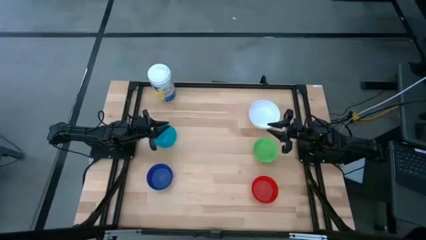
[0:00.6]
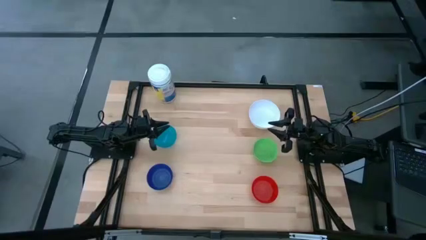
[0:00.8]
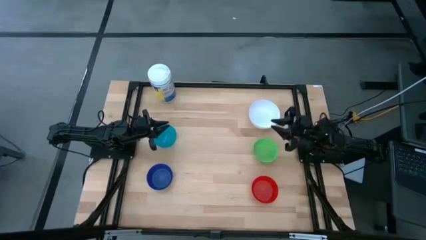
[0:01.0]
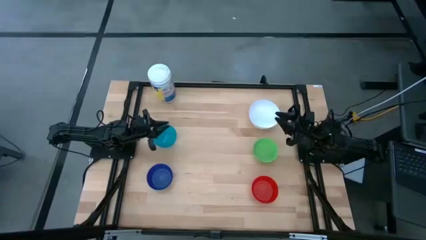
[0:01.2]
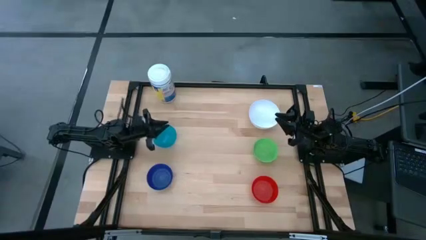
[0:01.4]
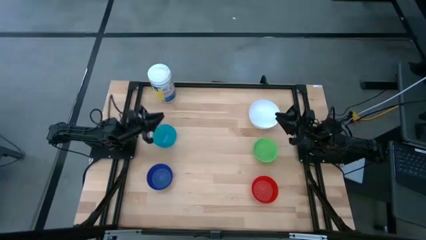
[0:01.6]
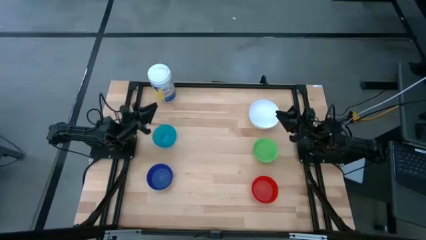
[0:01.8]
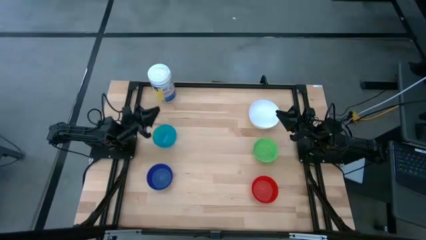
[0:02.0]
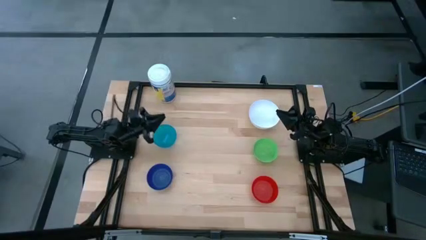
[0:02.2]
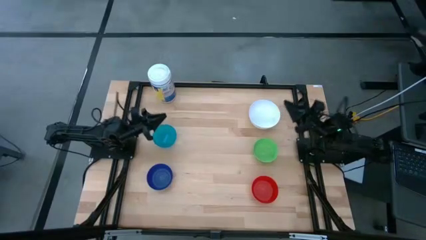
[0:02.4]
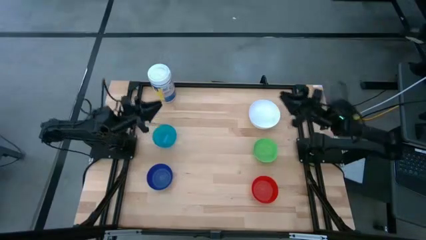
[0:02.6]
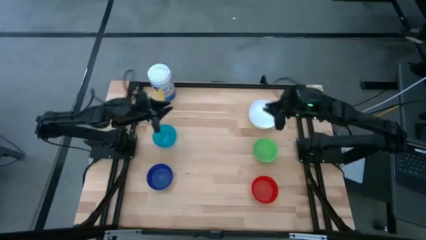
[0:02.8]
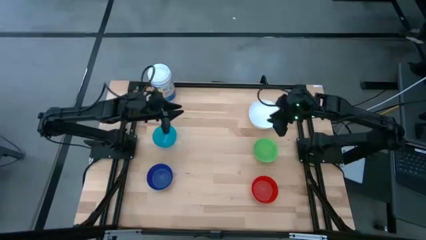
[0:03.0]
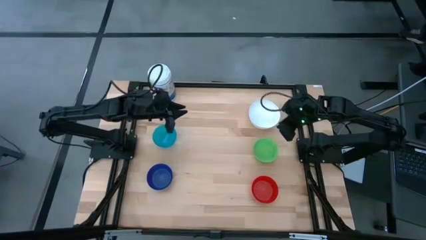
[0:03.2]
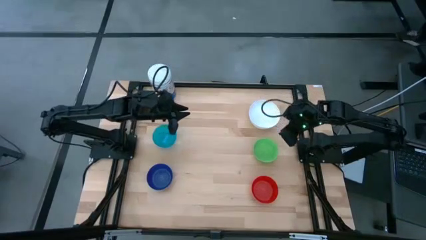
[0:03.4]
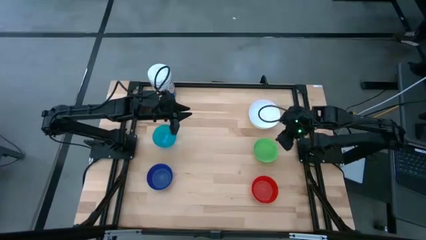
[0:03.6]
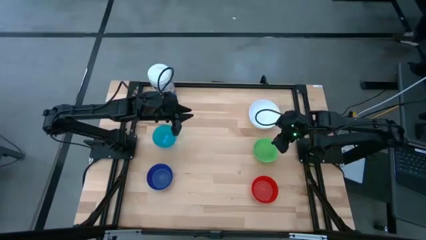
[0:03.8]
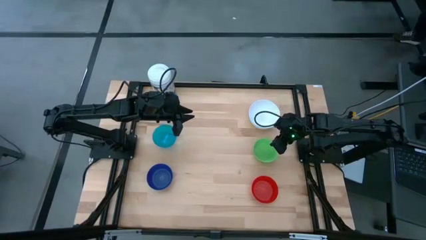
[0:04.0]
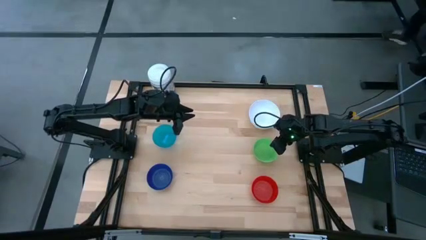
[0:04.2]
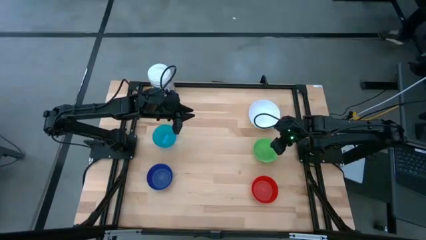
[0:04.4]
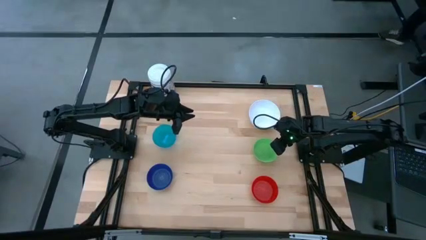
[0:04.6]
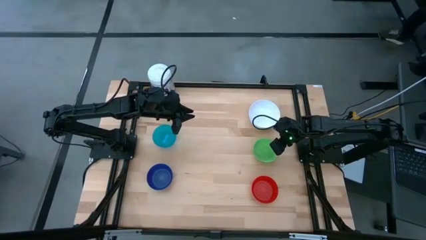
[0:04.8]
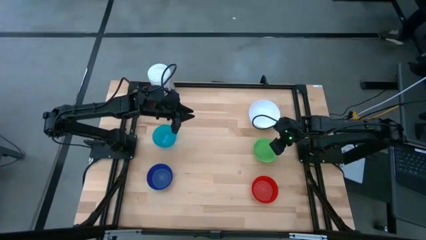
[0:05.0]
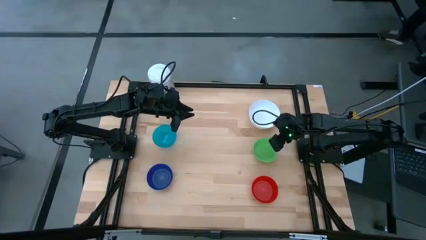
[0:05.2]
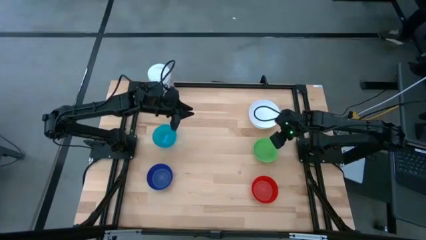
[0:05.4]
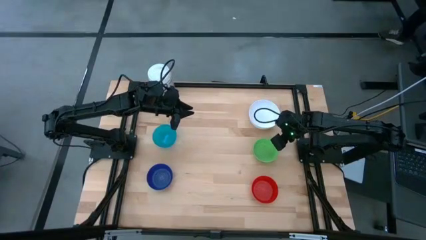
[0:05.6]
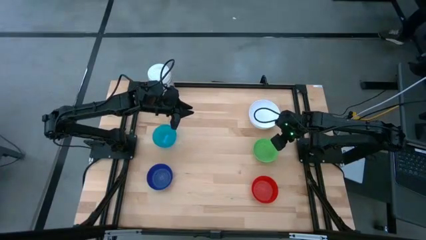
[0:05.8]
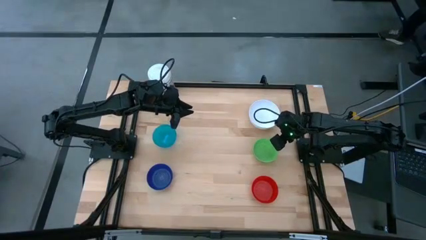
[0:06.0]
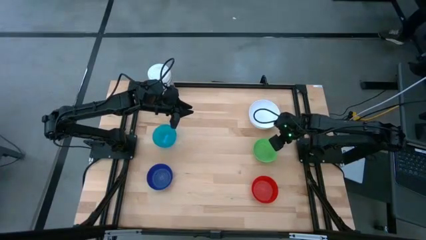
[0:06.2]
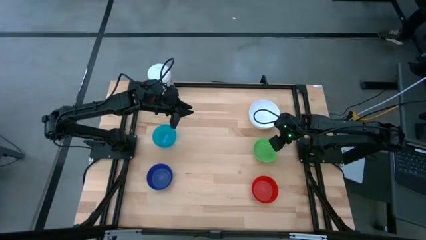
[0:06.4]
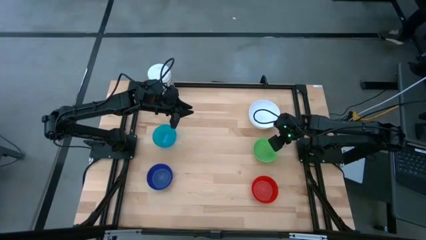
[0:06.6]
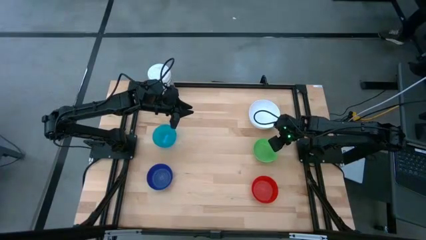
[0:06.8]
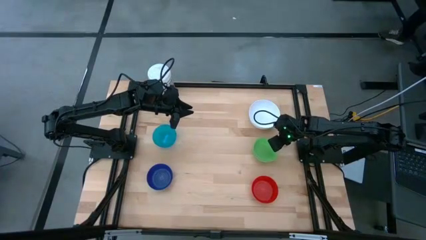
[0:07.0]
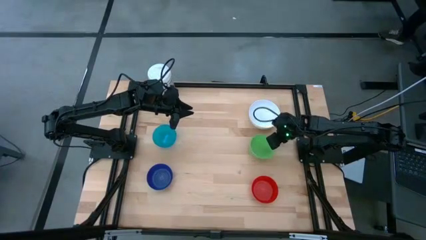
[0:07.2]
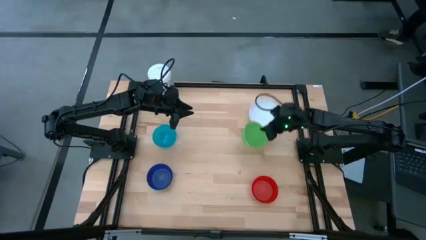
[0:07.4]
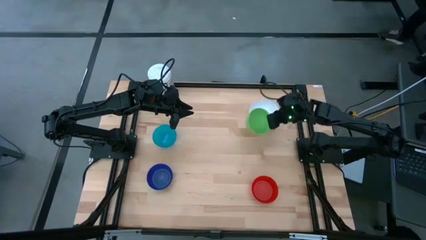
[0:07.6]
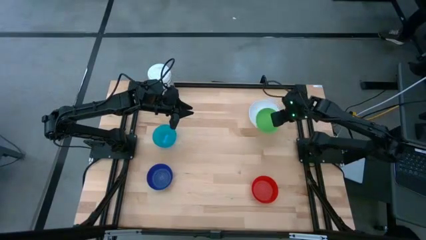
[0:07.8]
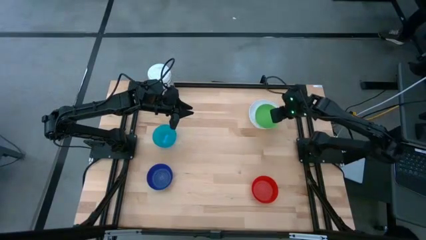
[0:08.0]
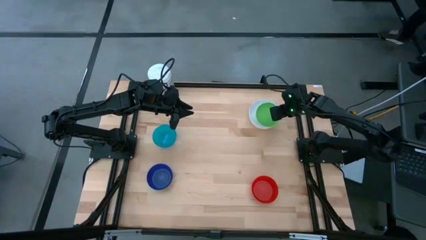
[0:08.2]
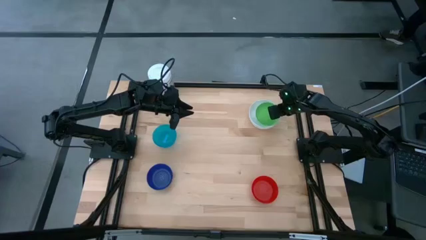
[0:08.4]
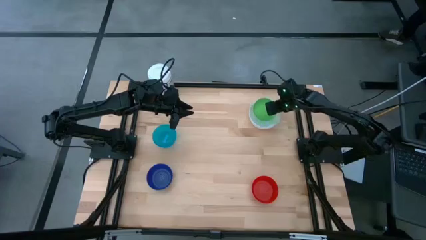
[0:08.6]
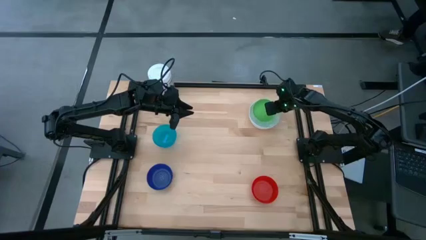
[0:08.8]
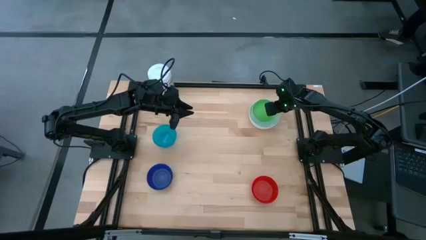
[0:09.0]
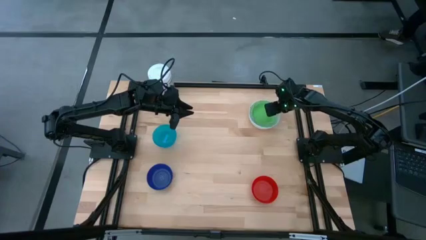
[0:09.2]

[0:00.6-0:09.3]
Stack the green bowl on top of the white bowl

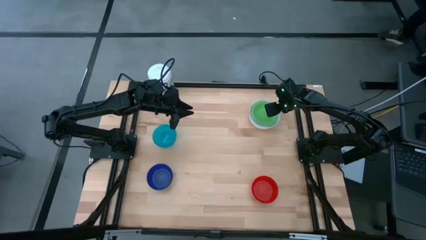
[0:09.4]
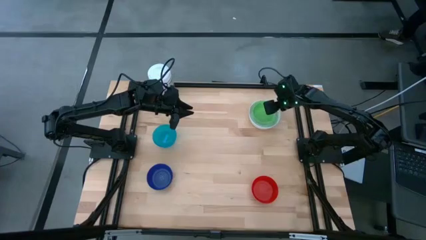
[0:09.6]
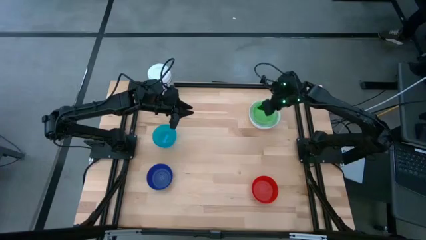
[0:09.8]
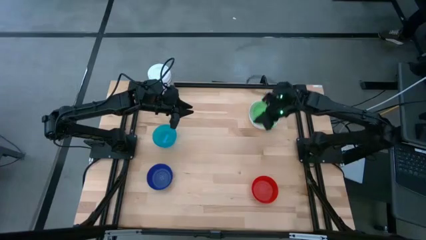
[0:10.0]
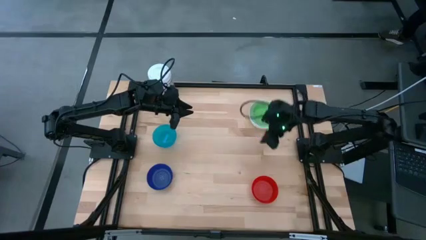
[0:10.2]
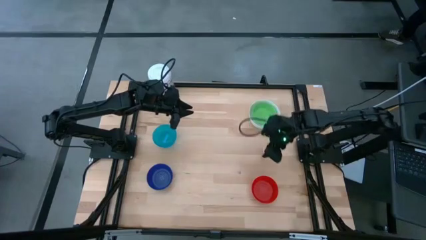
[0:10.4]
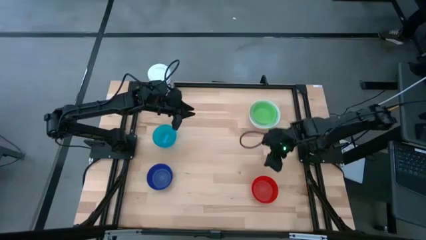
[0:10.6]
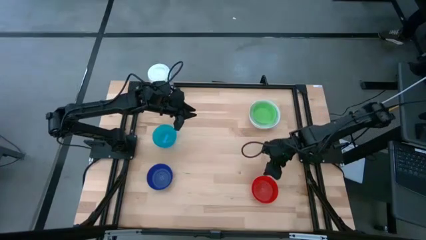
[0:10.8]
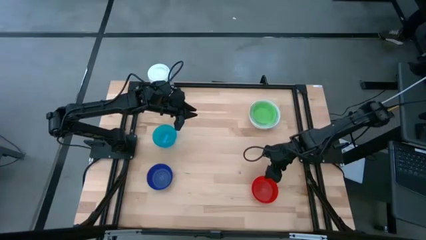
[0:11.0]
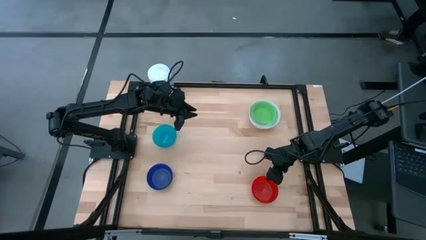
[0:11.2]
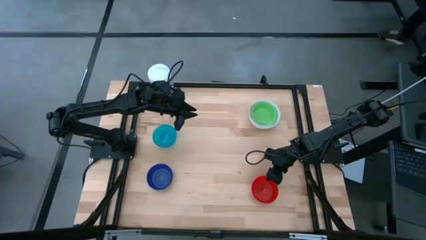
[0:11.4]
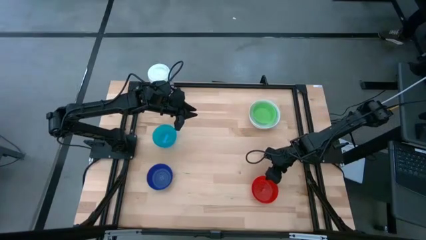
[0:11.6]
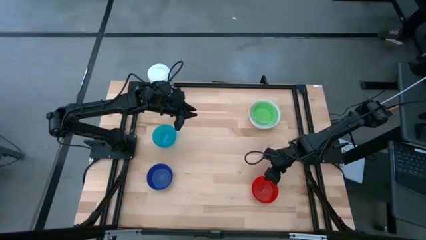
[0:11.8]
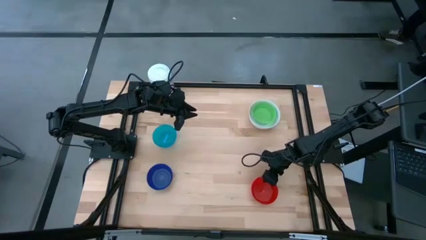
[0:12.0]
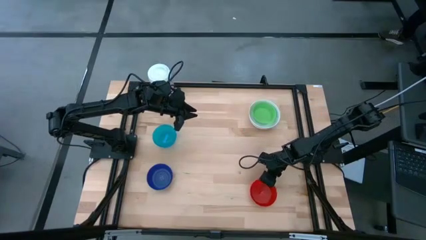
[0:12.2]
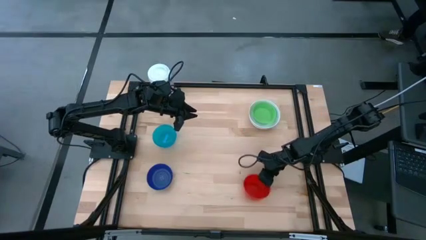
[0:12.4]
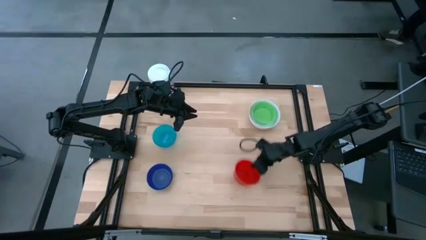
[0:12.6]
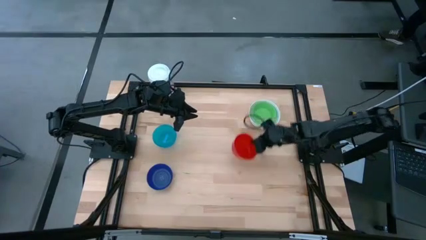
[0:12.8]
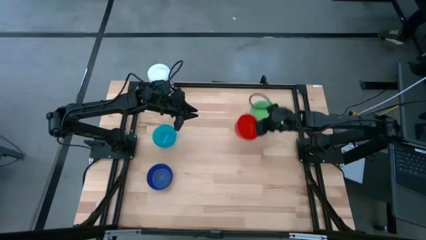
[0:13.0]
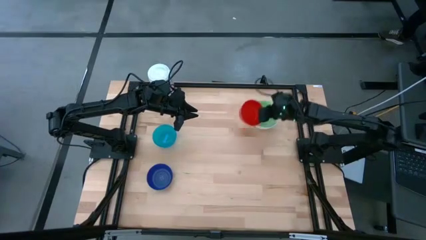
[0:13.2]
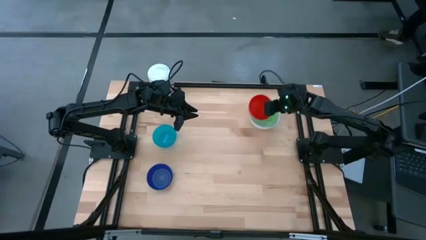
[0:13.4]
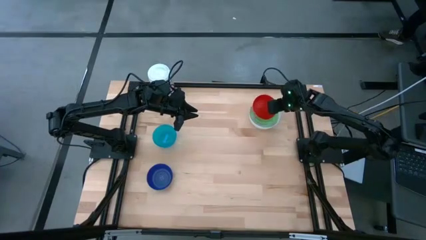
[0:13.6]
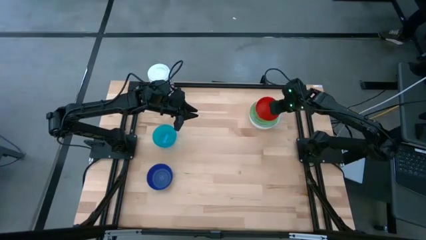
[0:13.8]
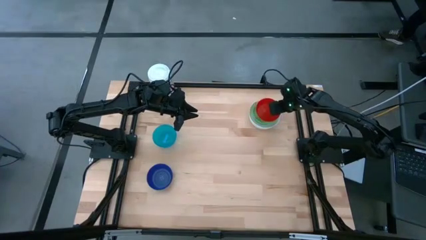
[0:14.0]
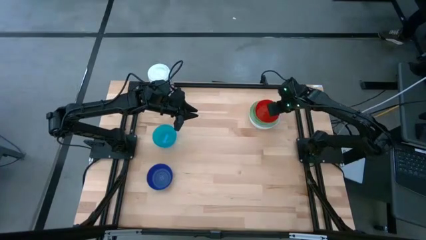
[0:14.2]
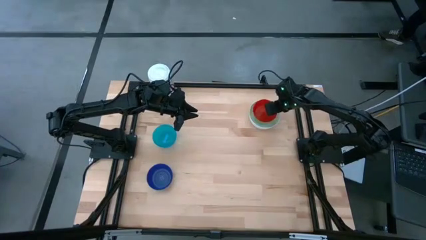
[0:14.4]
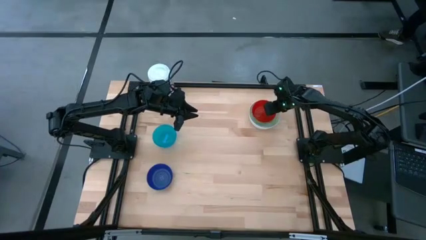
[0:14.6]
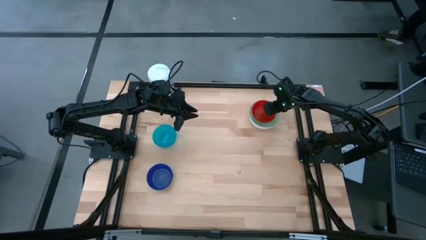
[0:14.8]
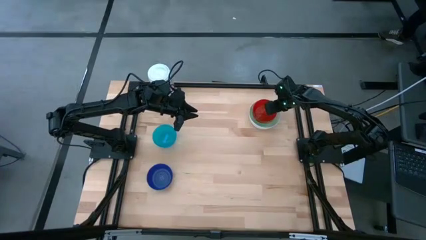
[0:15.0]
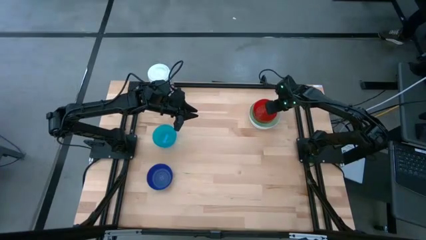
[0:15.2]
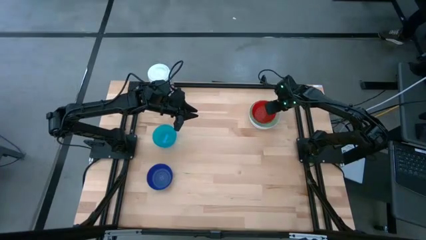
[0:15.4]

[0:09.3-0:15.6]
Stack the red bowl on top of the green bowl
